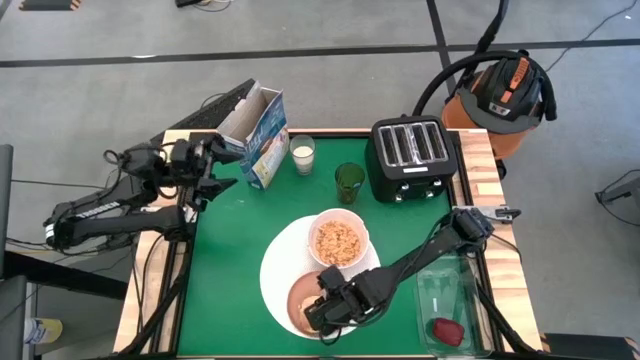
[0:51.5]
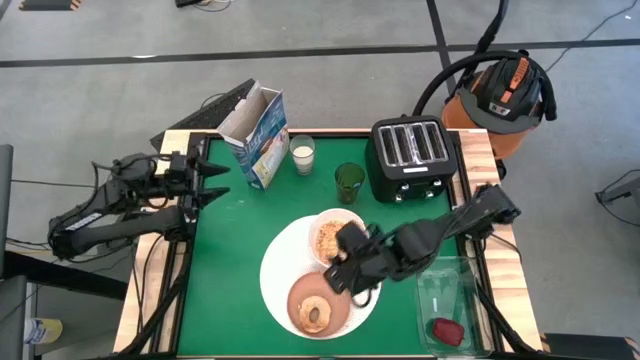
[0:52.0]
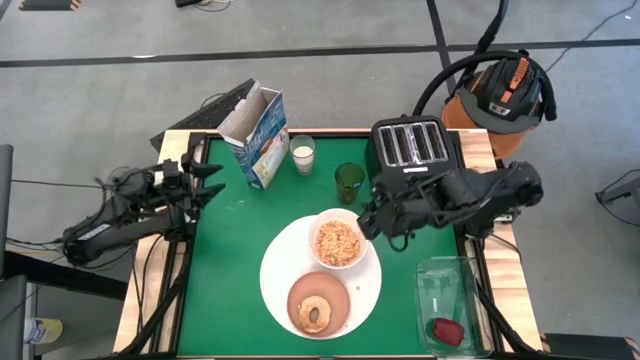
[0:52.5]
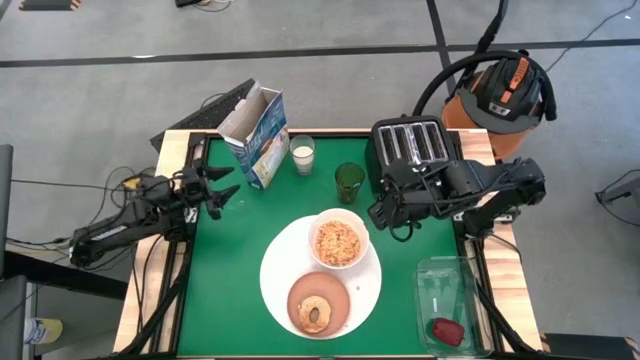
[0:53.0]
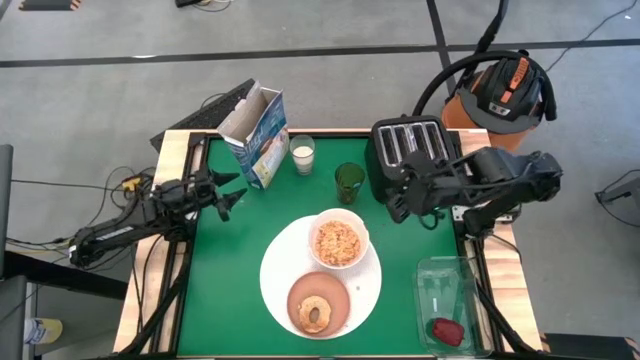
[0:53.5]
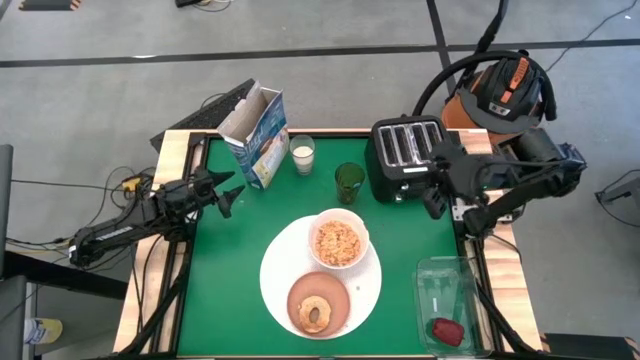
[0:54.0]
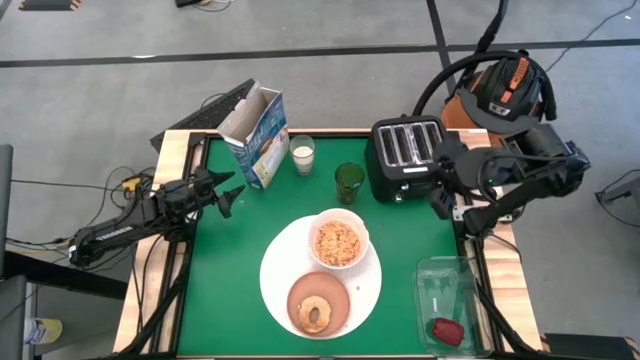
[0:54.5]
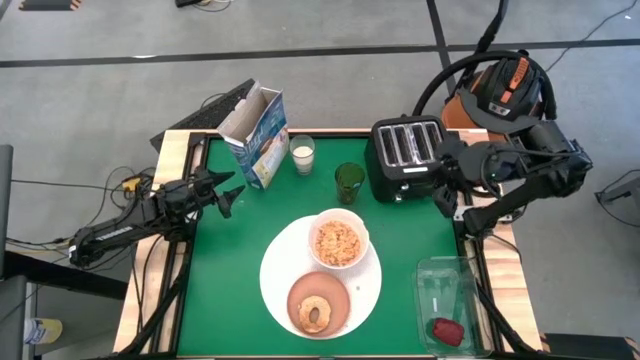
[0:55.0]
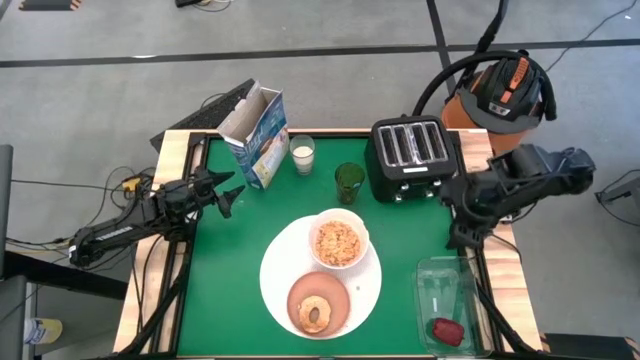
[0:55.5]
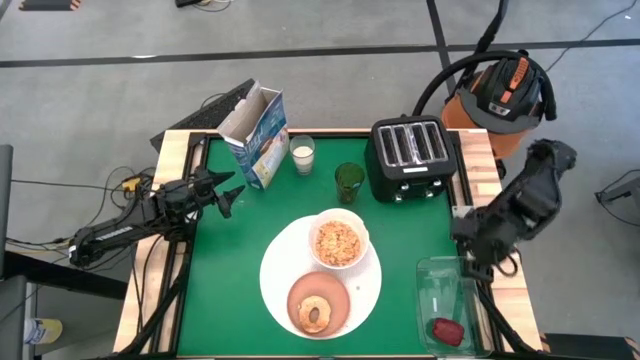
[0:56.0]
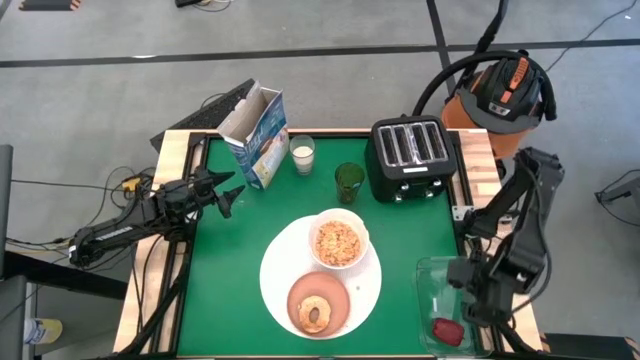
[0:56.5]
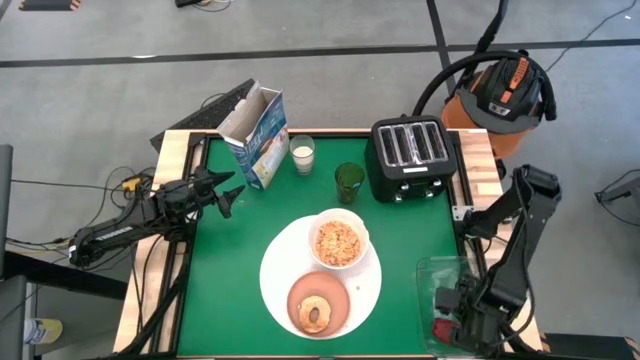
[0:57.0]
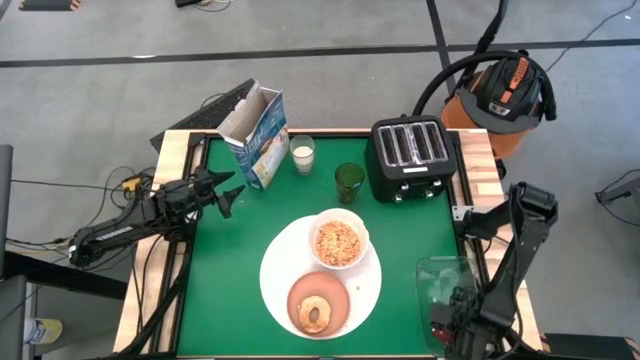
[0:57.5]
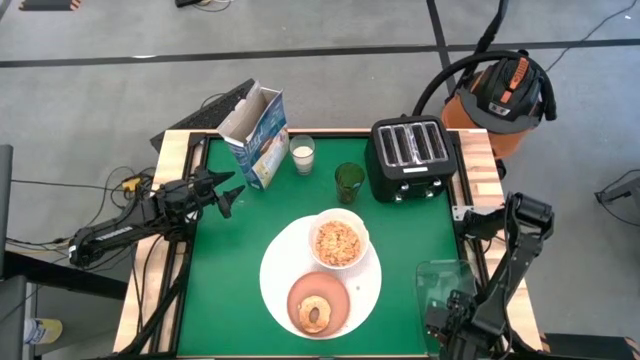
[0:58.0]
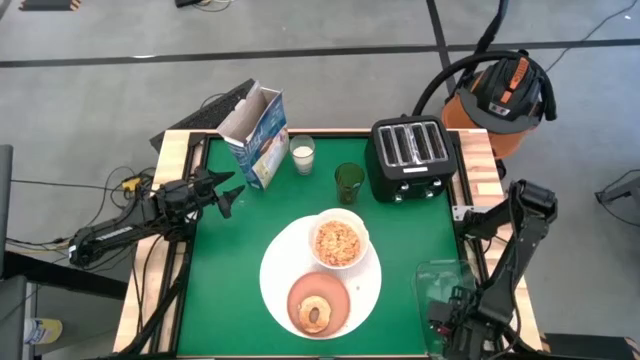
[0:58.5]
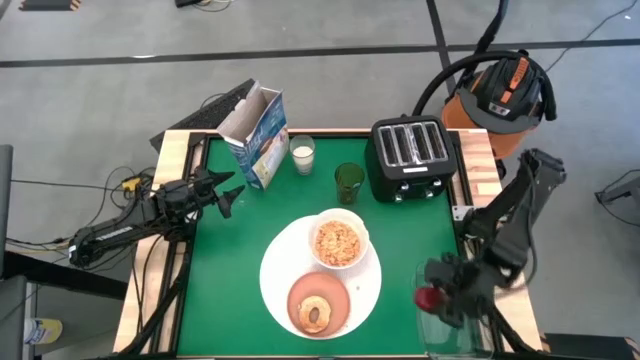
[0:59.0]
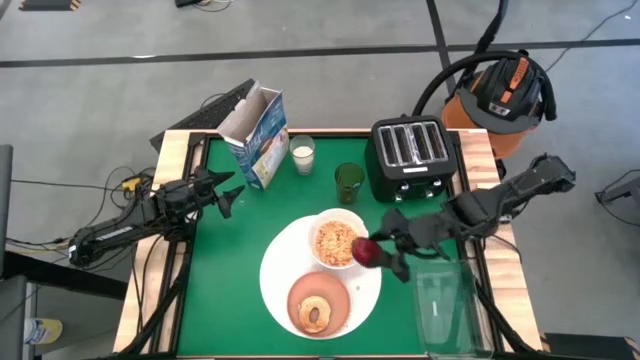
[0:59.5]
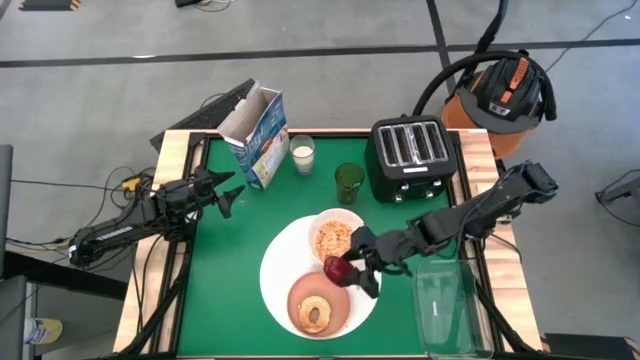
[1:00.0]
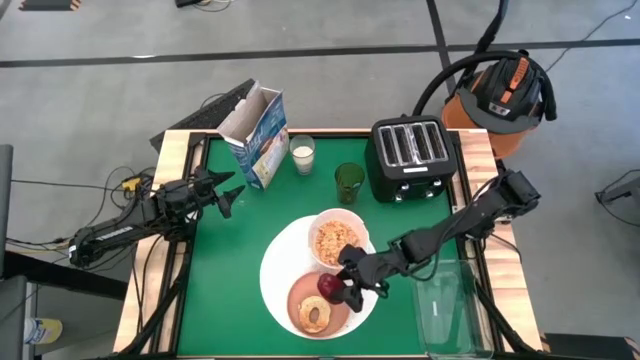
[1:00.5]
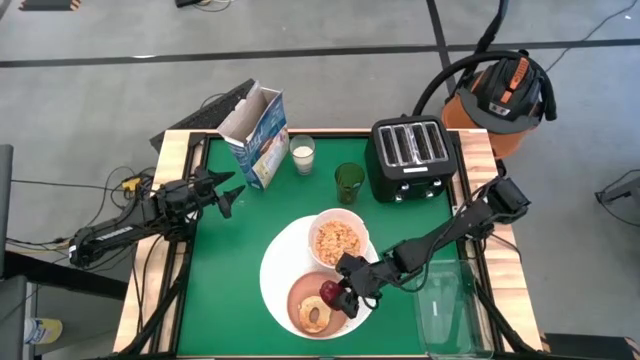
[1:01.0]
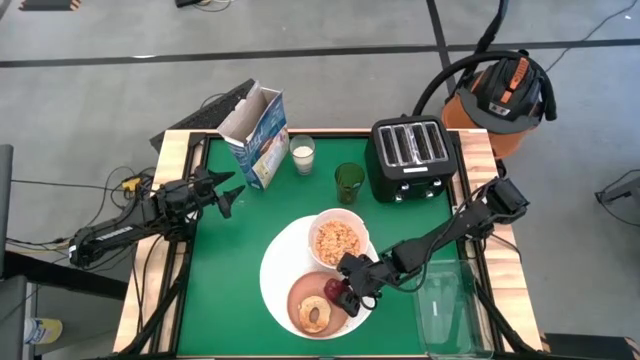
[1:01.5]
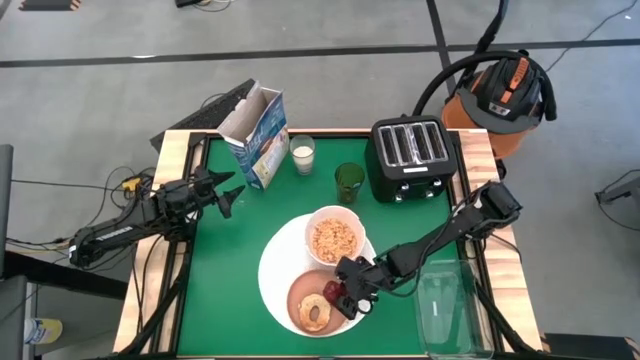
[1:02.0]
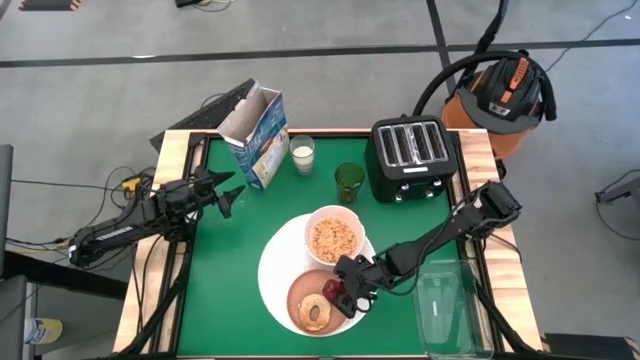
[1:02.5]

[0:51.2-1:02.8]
Task: Arrange a breakfast setting
Put the apple from the bin into the orange plate

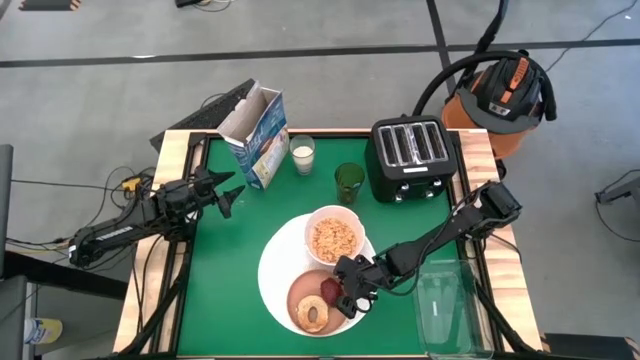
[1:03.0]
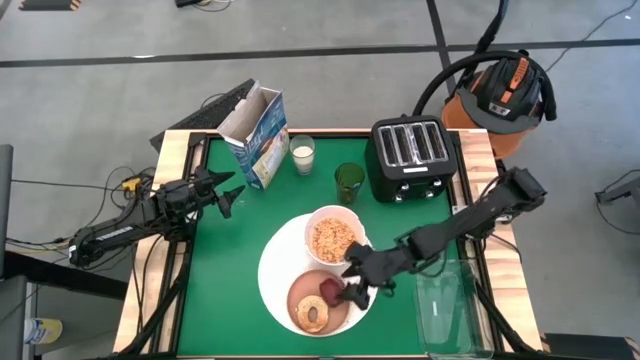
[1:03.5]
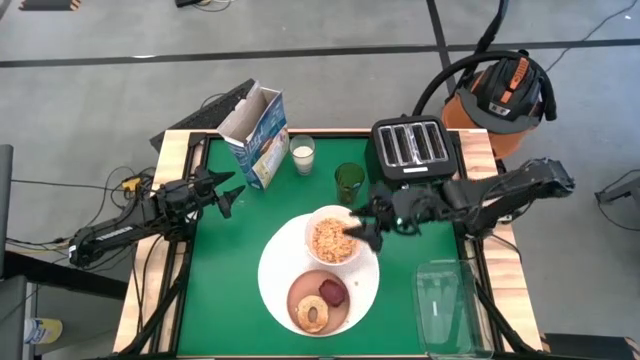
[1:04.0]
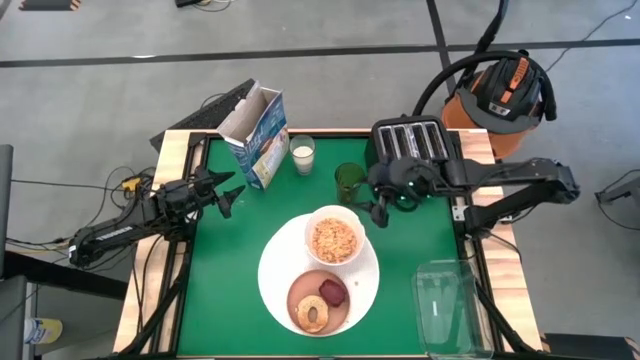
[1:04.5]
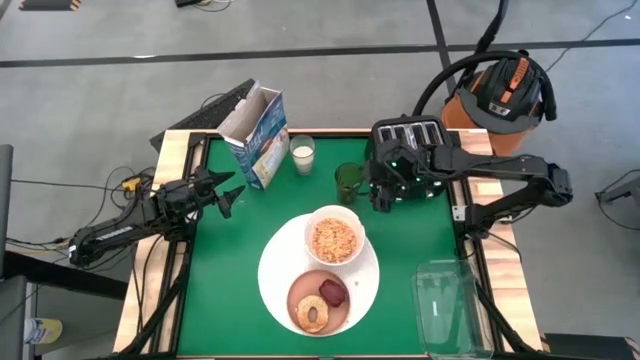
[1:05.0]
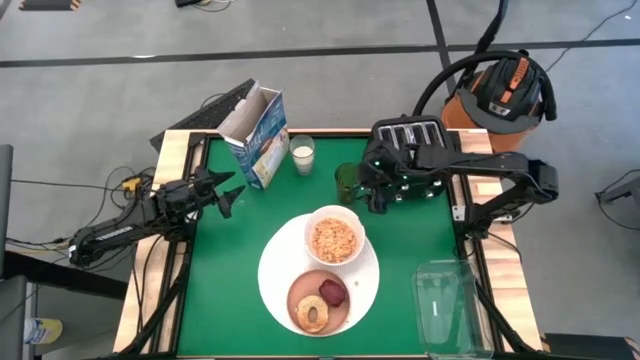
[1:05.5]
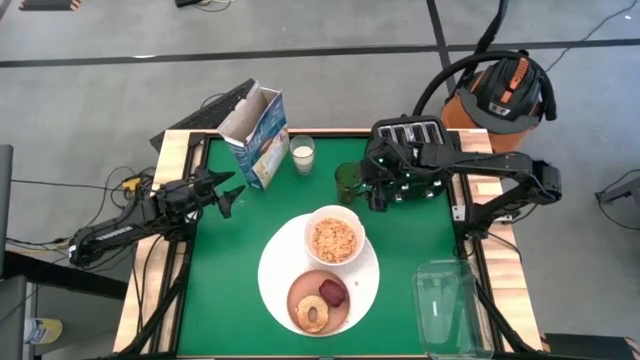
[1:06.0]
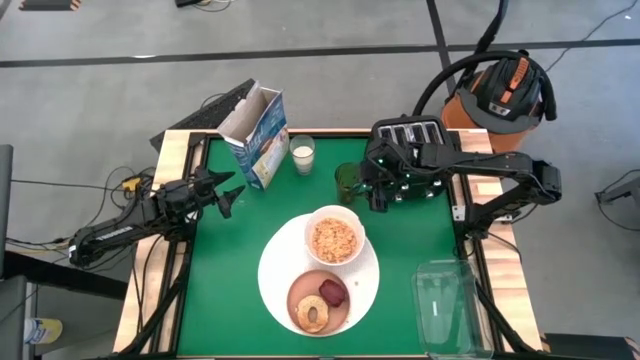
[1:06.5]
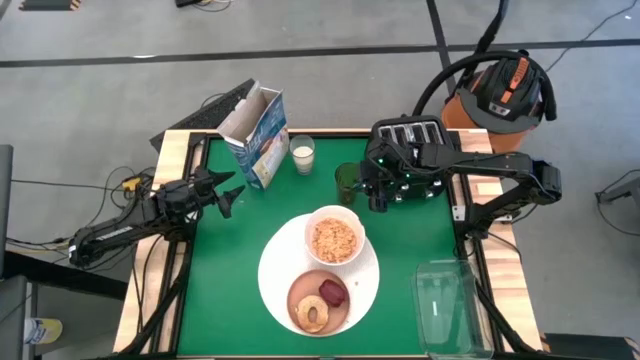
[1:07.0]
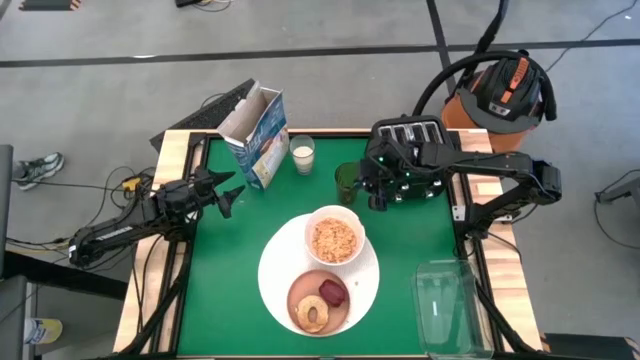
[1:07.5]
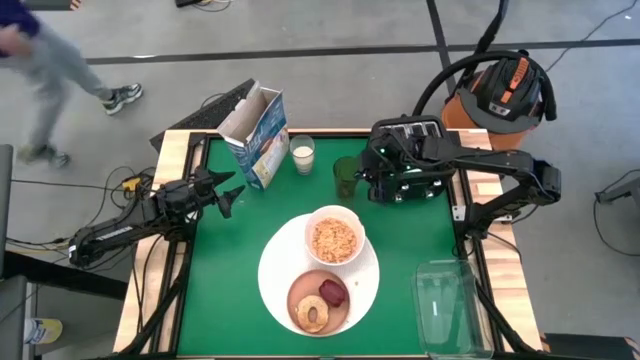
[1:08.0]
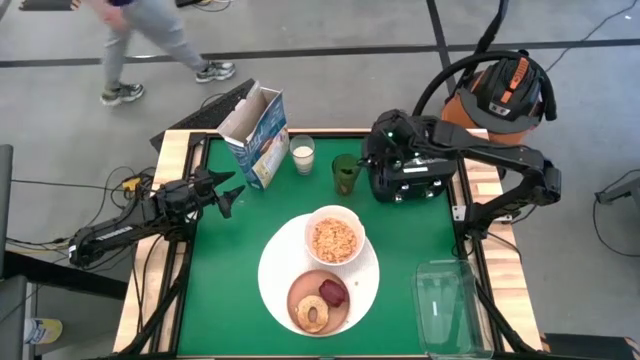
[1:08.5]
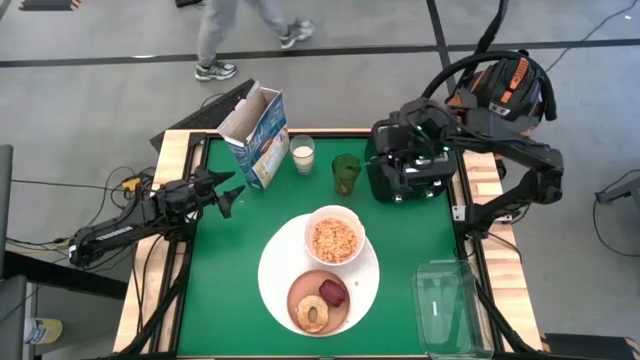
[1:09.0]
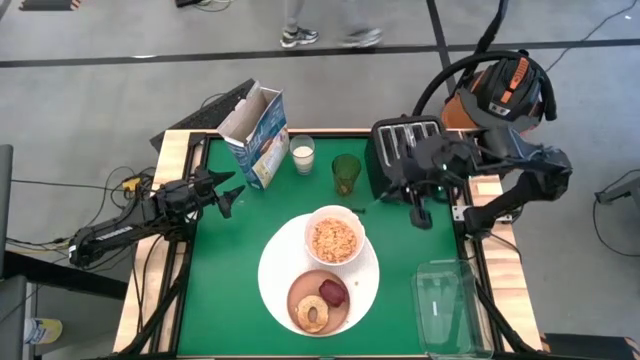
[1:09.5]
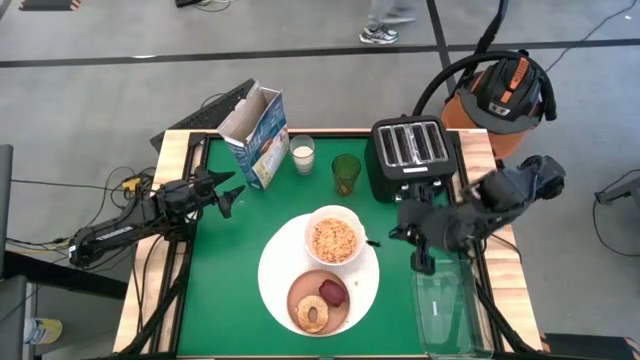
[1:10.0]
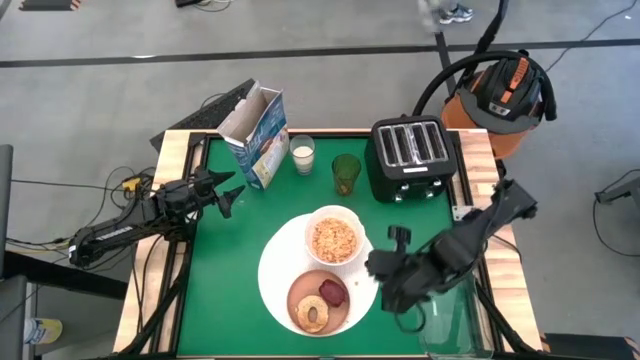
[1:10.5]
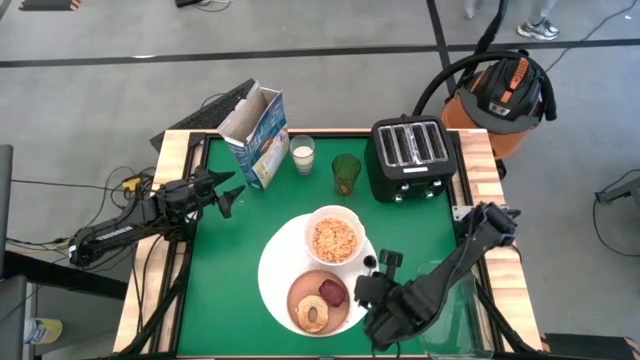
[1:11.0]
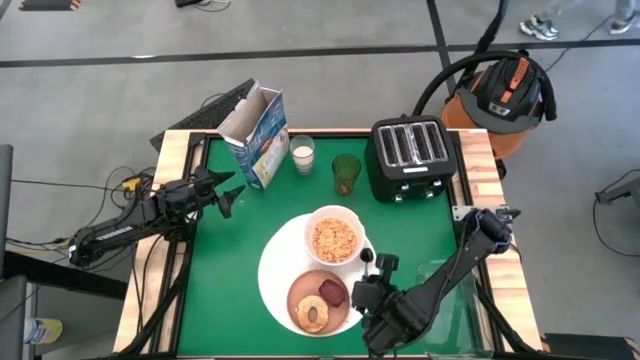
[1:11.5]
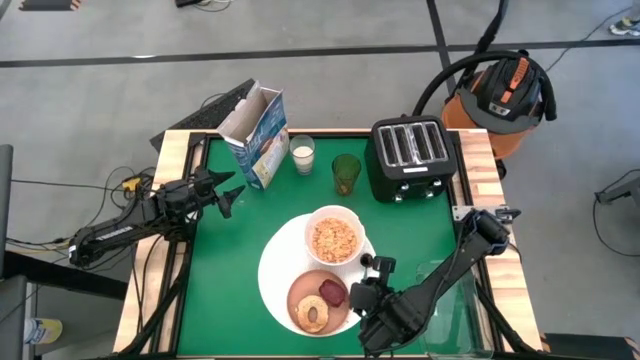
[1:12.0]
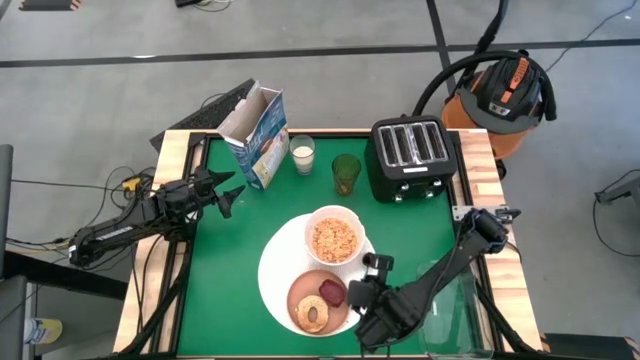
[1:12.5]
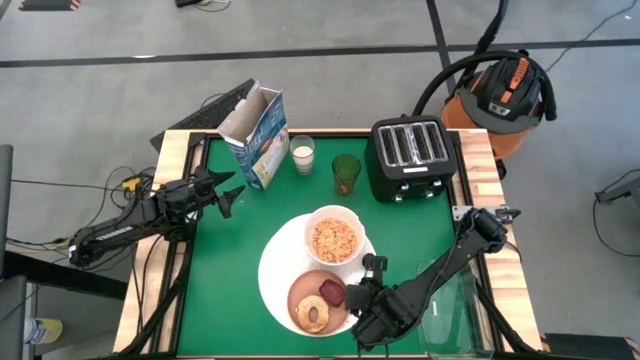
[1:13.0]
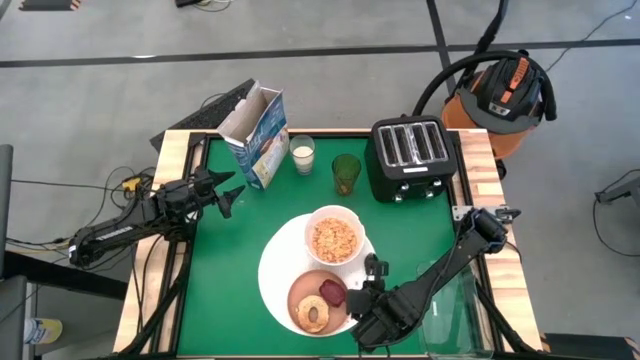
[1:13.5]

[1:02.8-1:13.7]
Put the blue spoon from the green glass beside the white bowl
